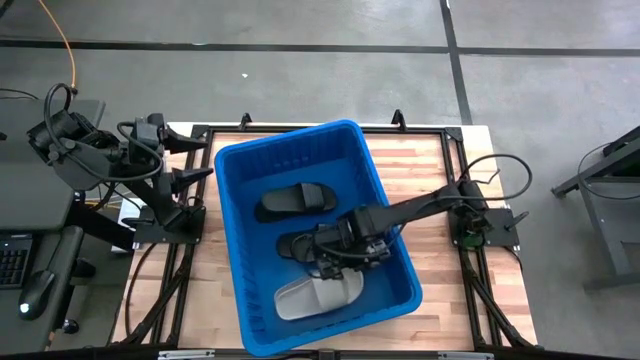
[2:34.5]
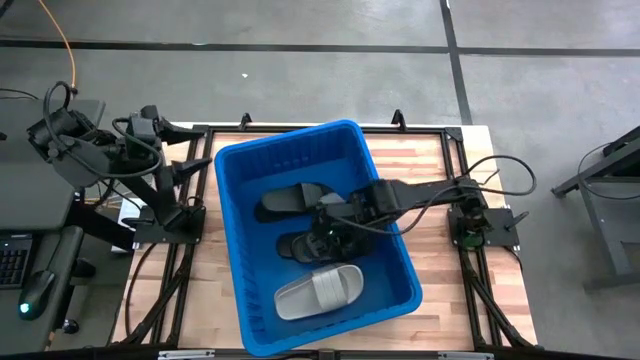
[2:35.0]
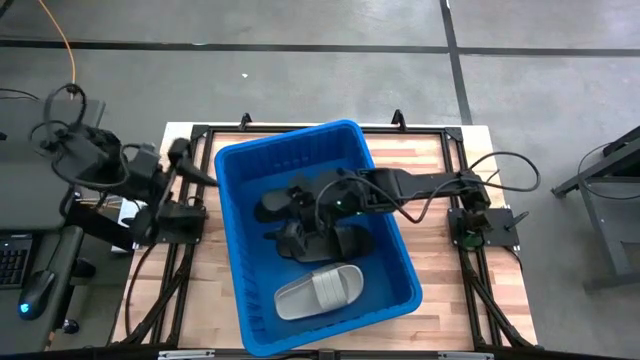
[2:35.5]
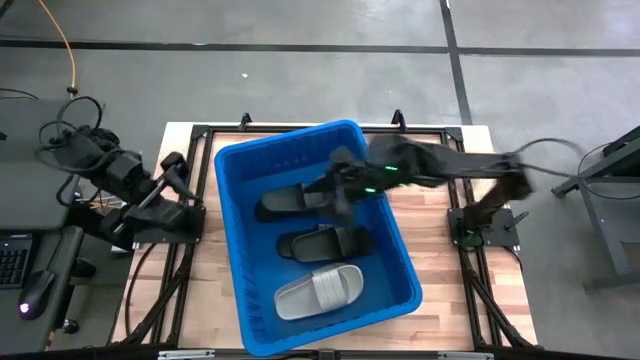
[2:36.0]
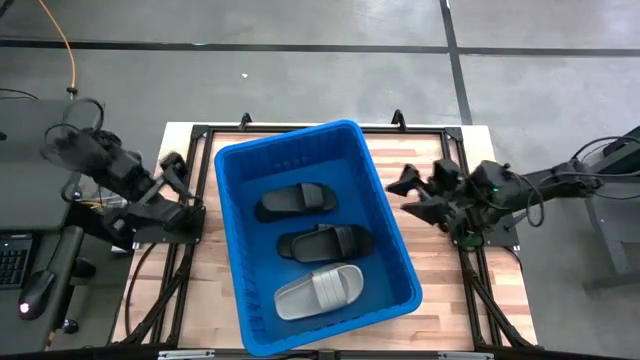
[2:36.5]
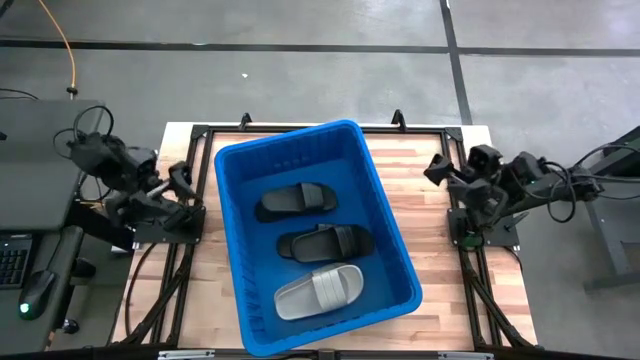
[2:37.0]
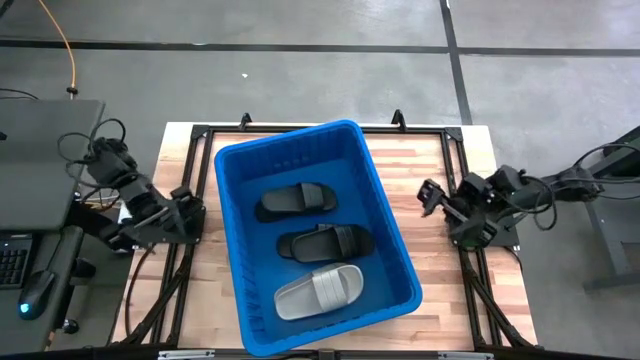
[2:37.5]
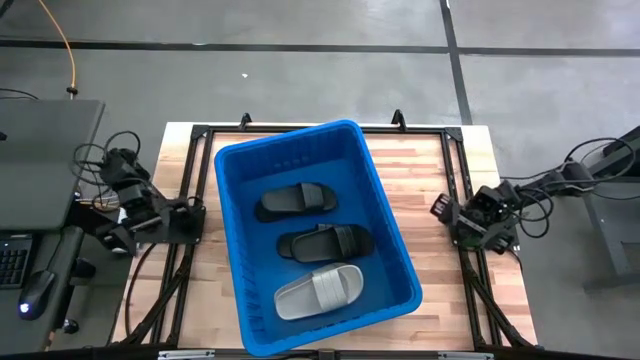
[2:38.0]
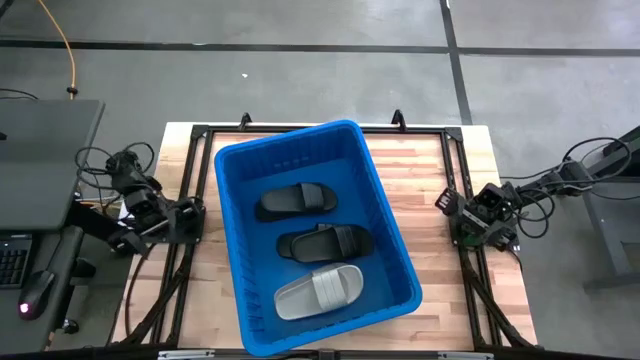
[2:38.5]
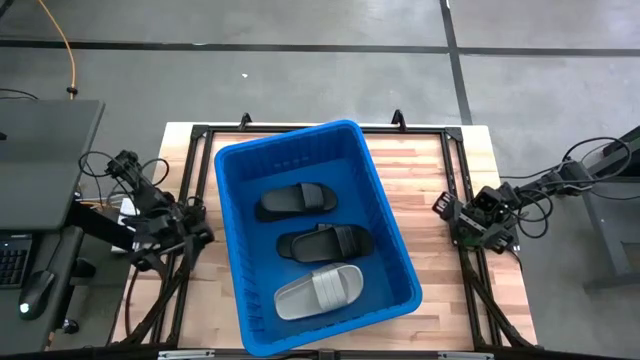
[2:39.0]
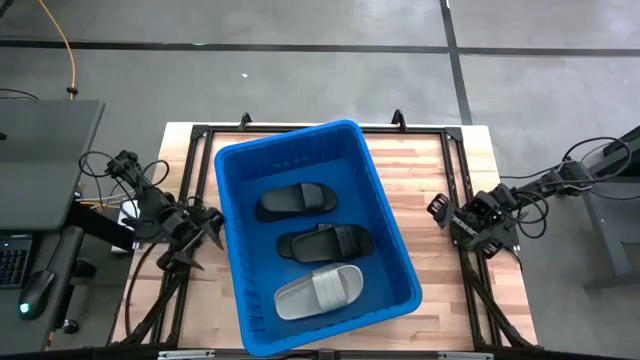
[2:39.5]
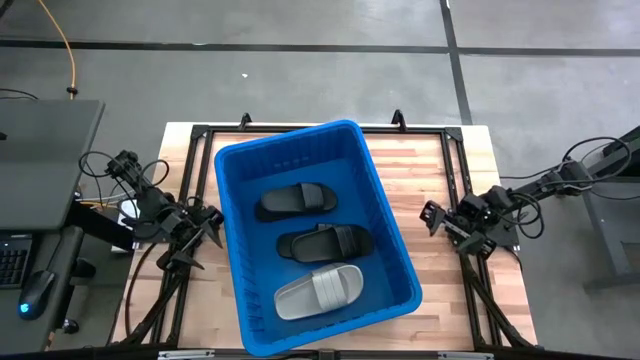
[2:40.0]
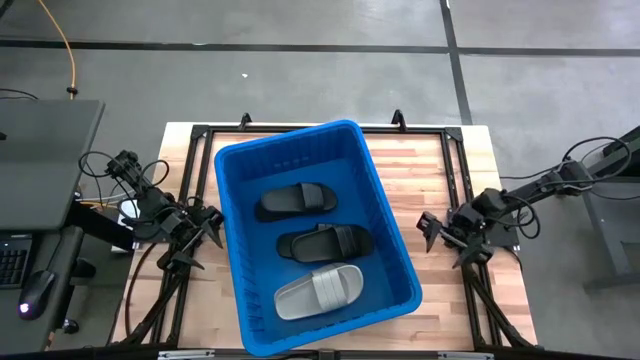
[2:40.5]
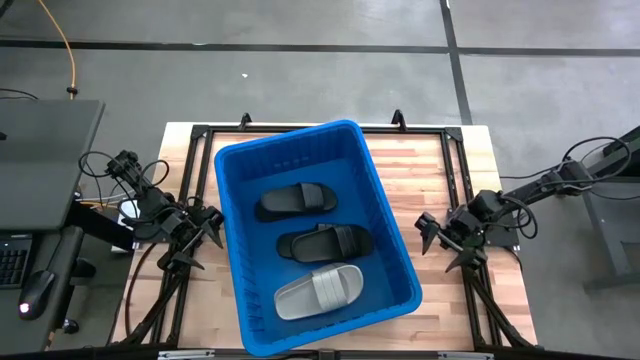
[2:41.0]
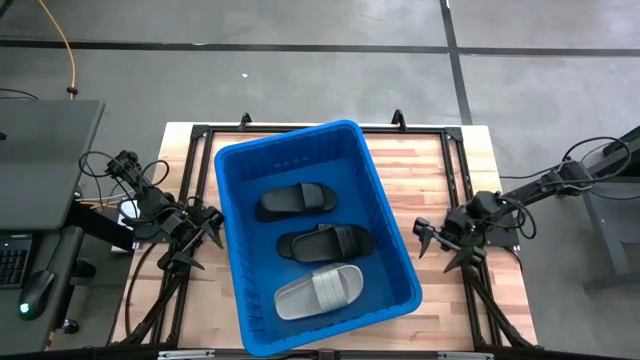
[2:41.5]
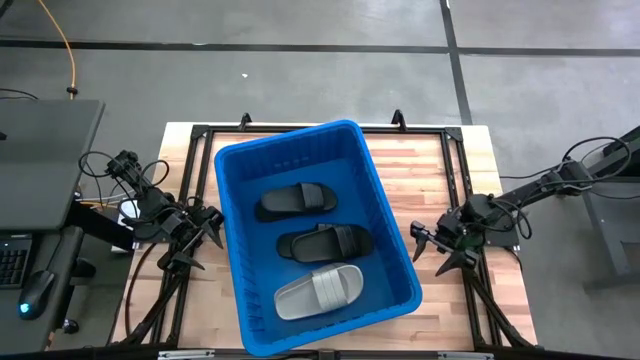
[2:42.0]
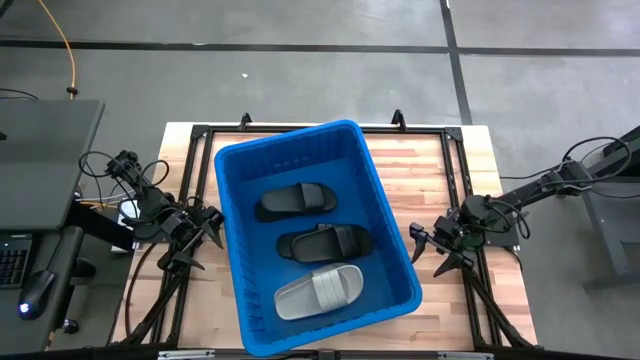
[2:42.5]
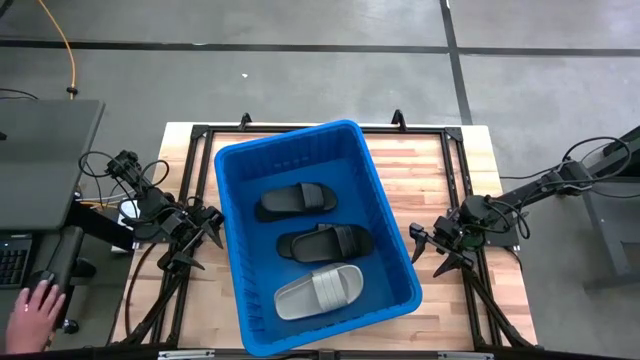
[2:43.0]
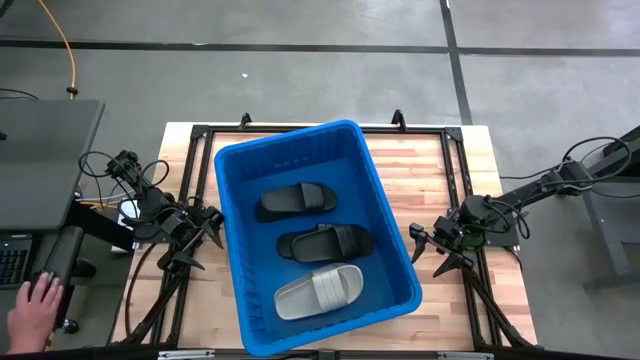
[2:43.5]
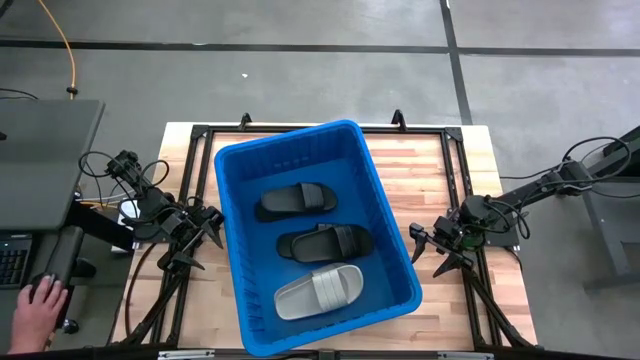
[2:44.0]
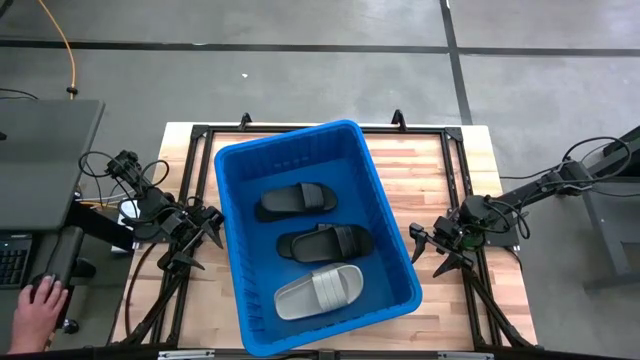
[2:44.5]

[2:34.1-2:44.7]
Task: Pick and place slides into bin
Return to Home Position

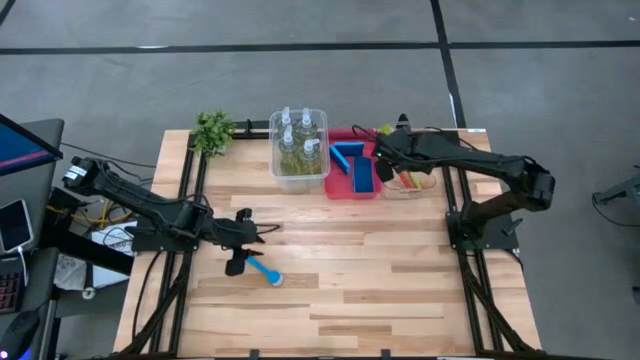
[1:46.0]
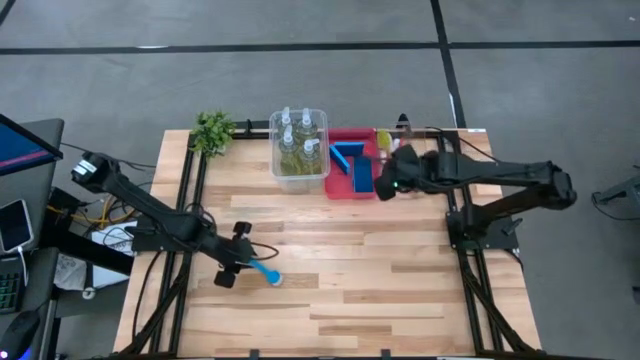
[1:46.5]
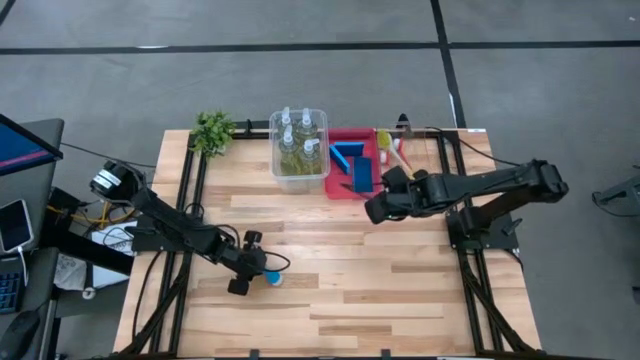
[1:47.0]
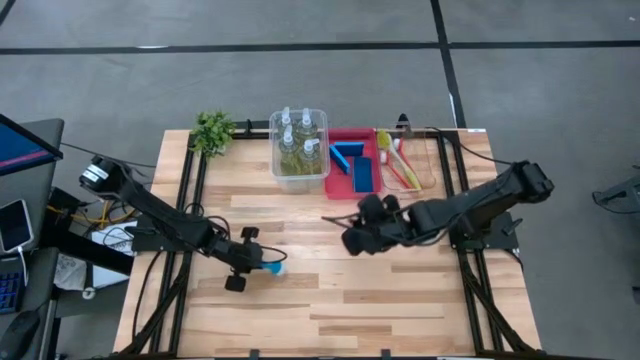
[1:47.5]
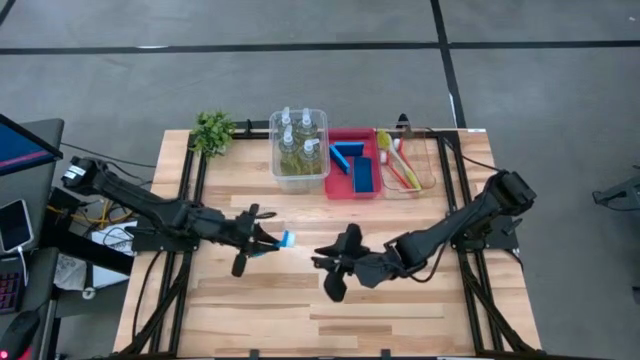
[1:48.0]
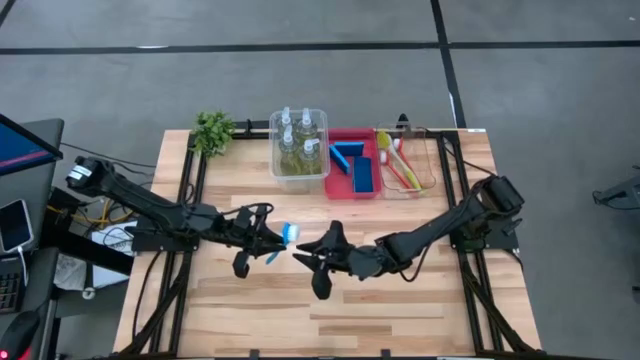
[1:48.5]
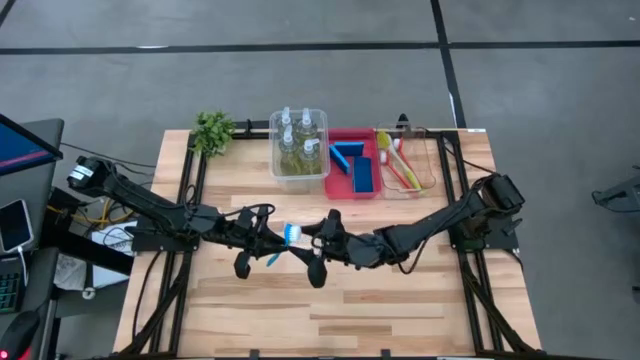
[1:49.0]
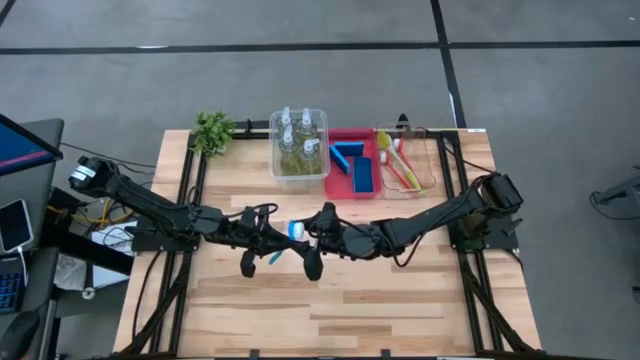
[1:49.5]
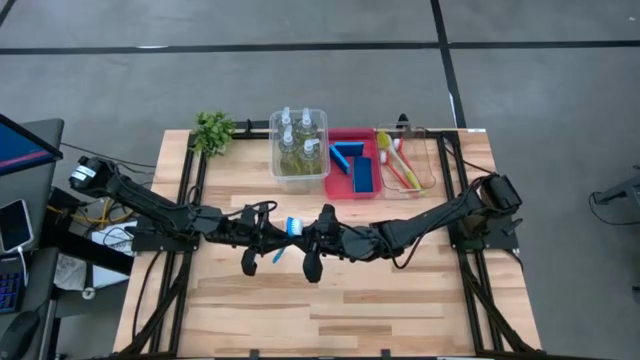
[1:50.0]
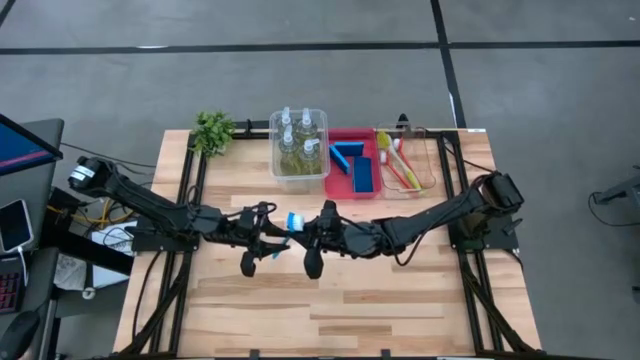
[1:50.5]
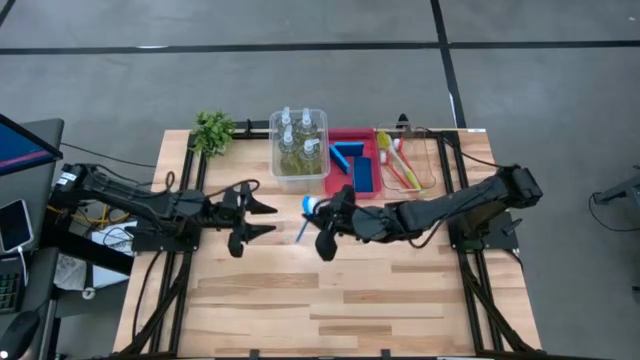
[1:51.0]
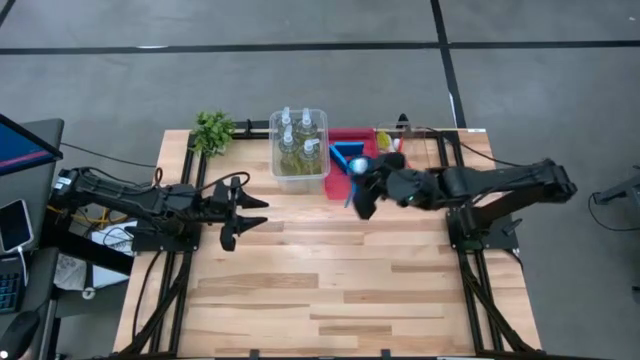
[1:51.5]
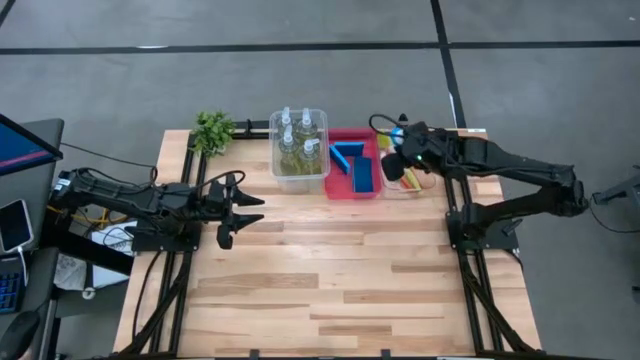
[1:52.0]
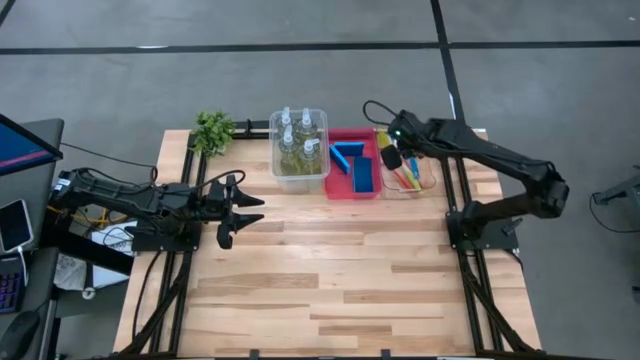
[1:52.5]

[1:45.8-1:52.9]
Task: Pick & Place Kitchen Sink Supplies
Put the blue dish brush into the transparent bin
